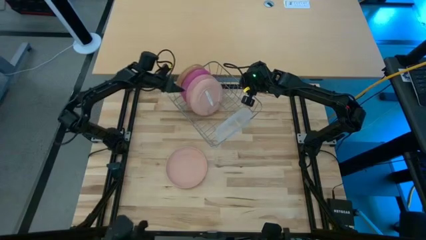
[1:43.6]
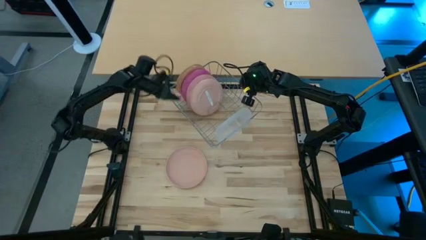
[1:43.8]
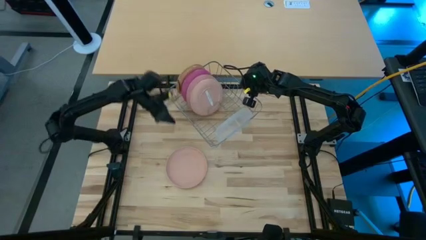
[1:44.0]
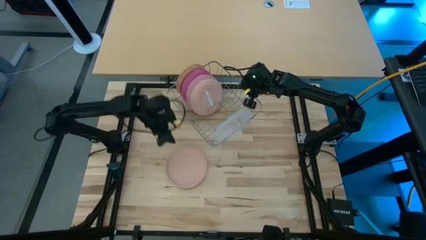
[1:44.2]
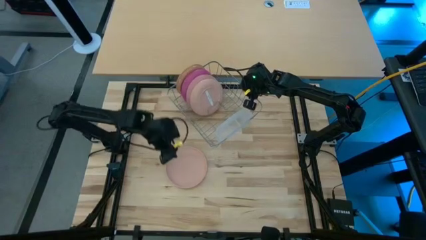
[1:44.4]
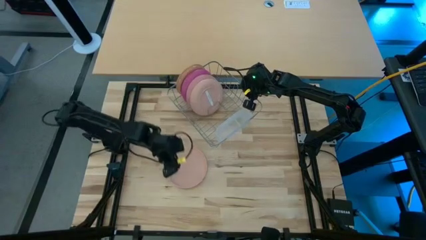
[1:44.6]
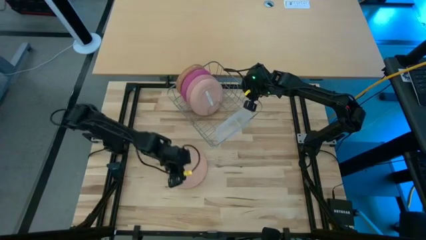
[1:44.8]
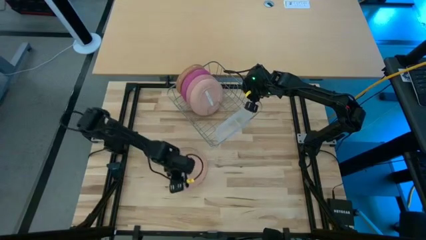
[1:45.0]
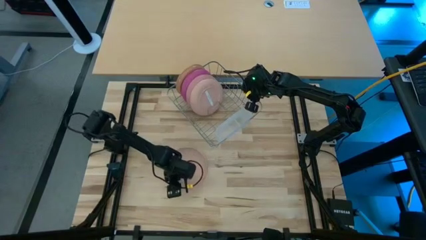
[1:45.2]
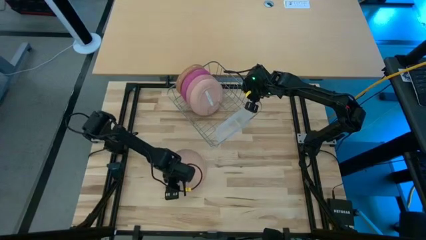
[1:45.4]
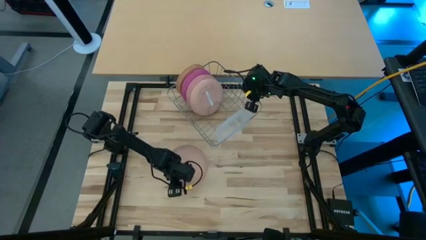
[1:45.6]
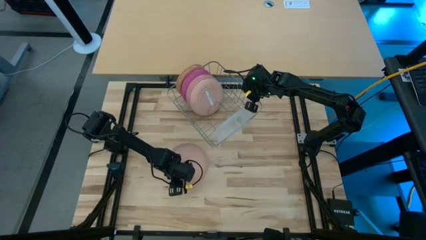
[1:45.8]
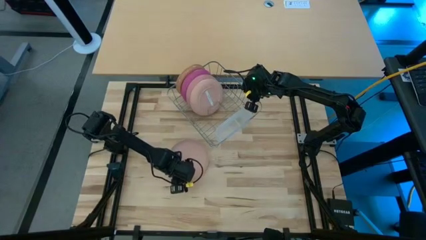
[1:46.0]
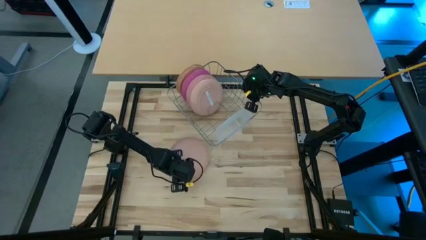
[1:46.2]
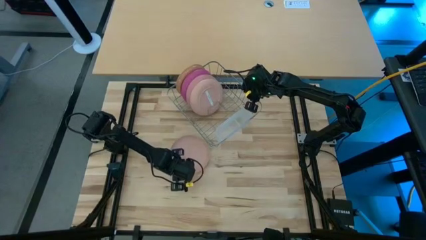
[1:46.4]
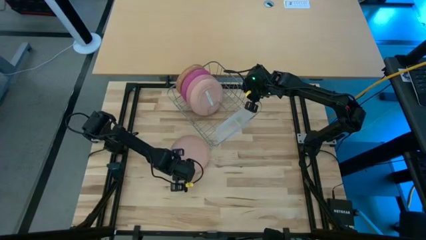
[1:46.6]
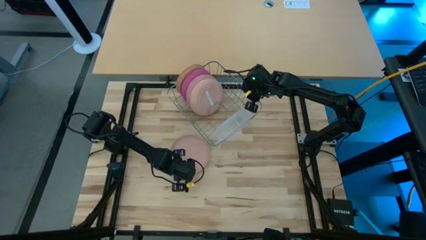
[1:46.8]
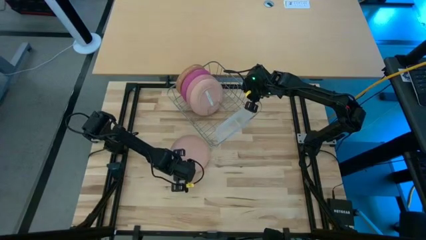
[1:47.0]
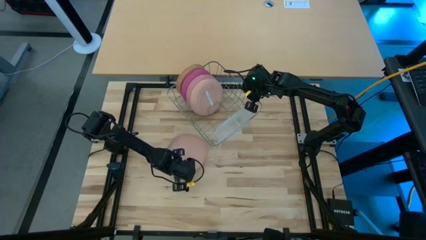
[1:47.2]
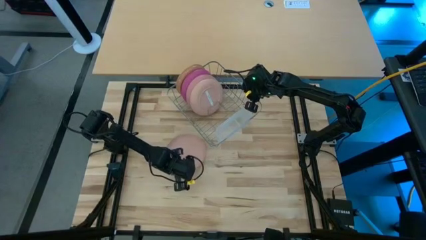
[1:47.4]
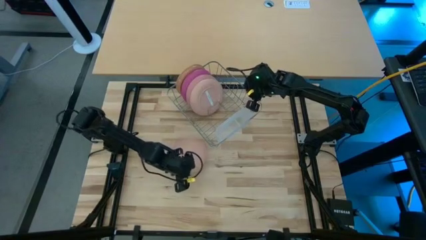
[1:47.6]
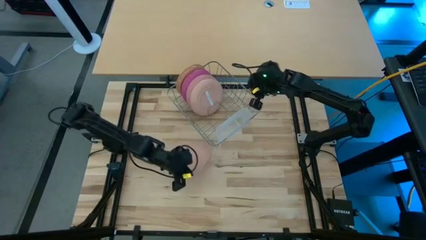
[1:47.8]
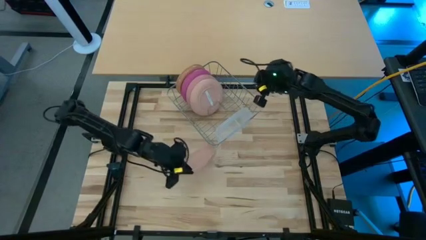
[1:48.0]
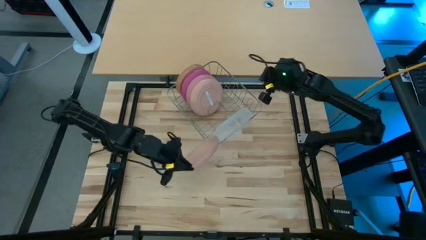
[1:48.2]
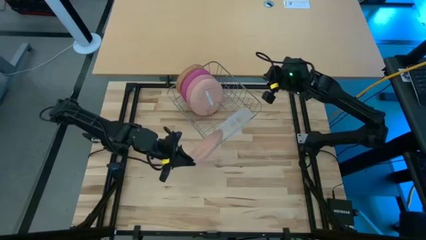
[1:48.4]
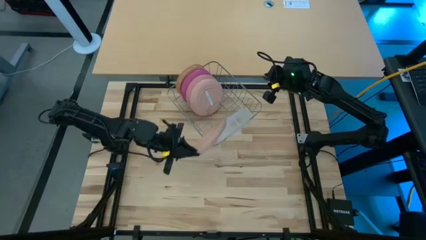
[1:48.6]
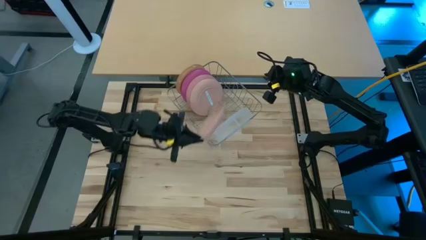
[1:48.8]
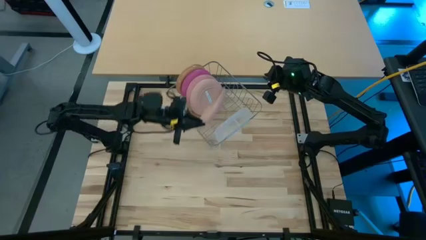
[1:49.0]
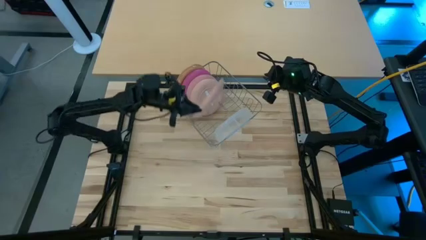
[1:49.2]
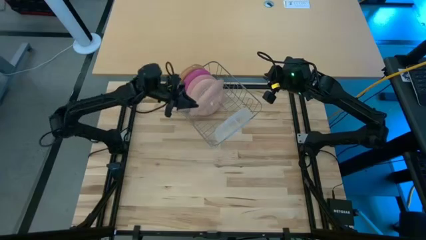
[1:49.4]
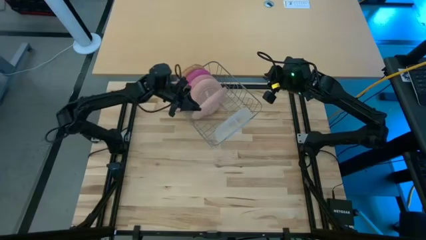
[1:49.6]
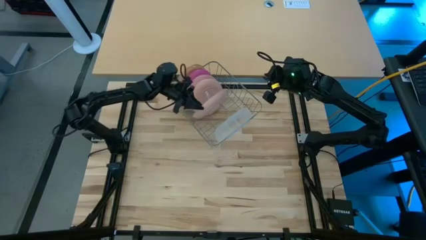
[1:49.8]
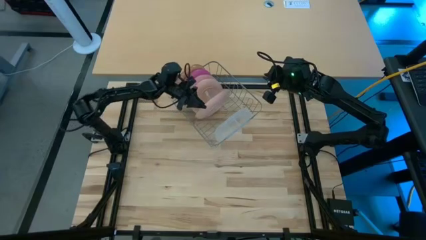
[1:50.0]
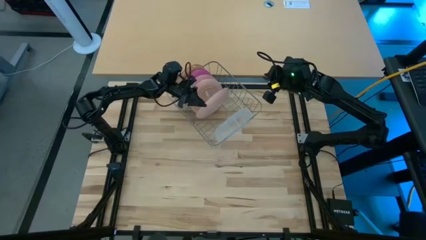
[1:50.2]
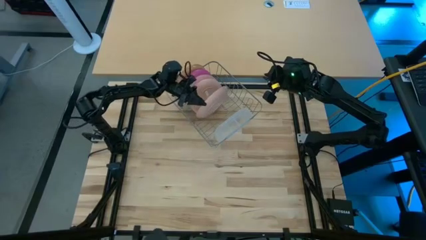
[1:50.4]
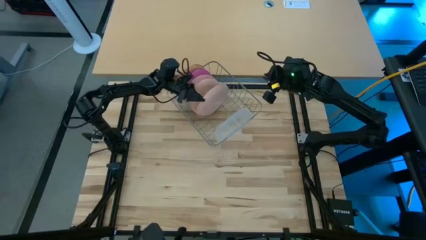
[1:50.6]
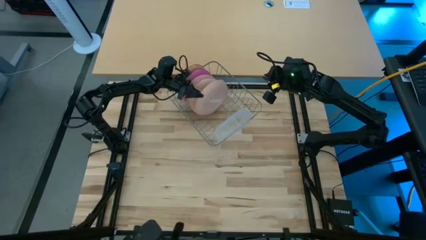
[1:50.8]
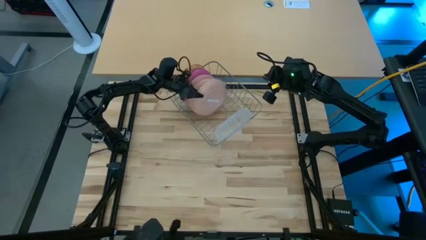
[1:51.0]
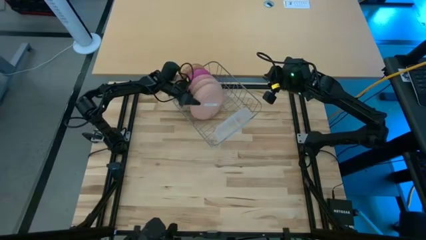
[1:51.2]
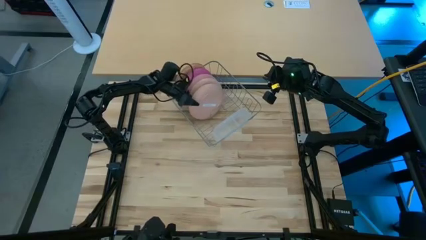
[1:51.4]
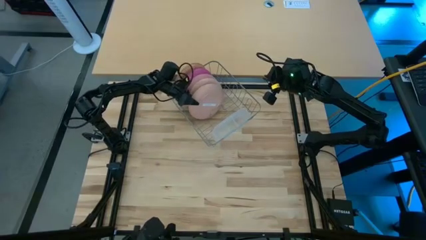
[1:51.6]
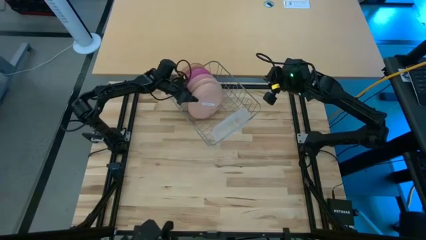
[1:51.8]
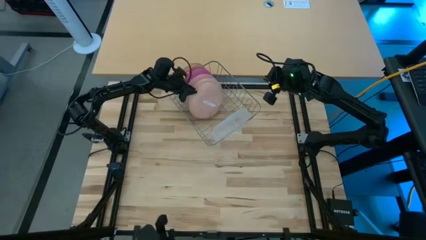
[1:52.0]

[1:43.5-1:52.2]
Task: Sort dishes
Put the pink plate into the dish rack

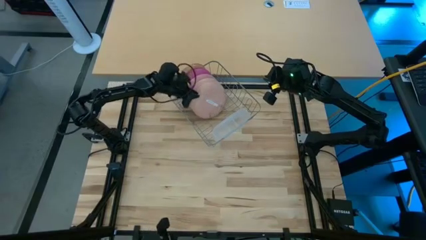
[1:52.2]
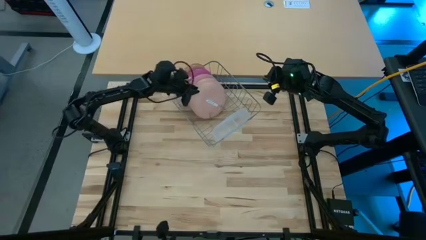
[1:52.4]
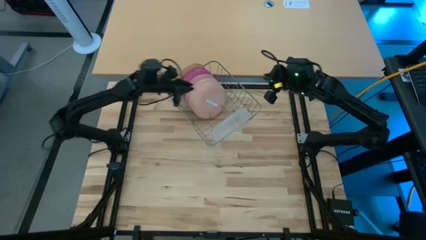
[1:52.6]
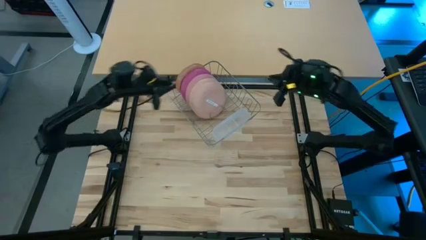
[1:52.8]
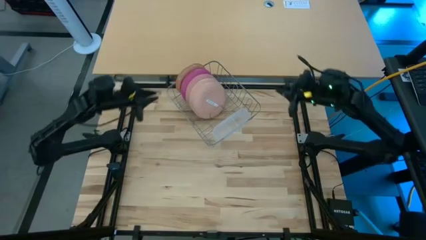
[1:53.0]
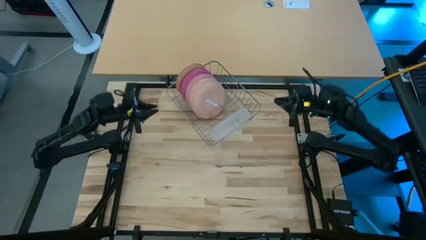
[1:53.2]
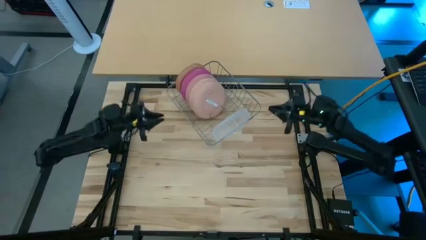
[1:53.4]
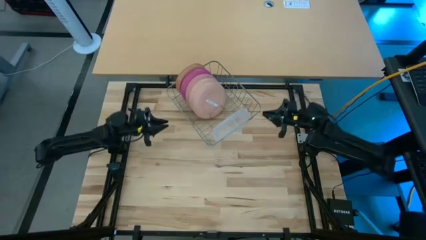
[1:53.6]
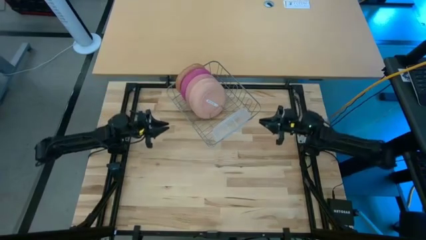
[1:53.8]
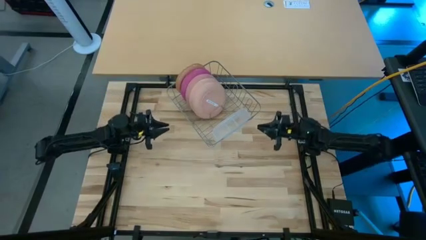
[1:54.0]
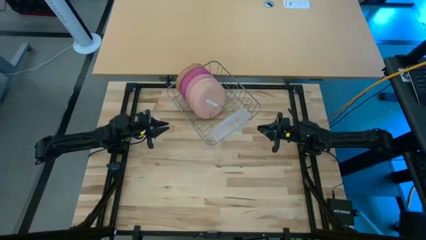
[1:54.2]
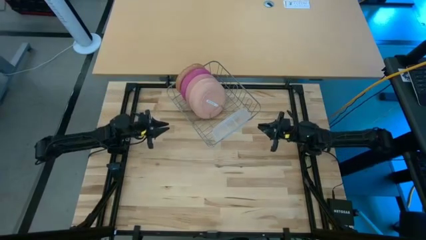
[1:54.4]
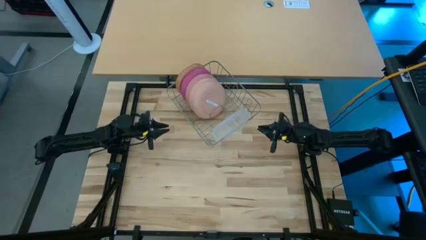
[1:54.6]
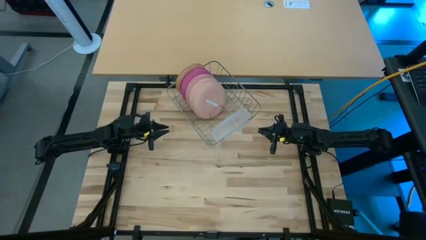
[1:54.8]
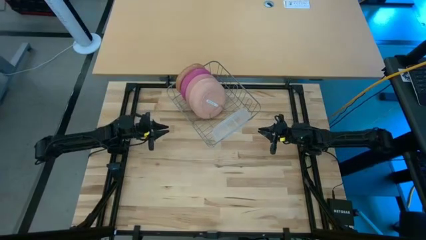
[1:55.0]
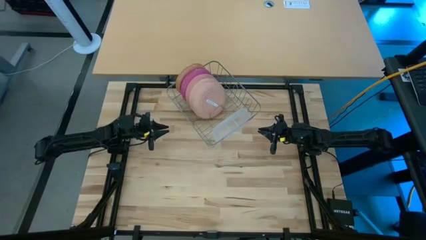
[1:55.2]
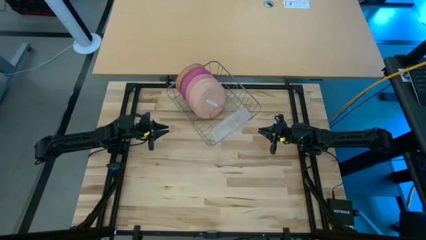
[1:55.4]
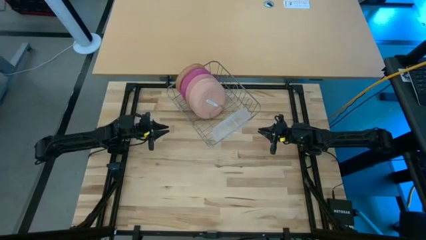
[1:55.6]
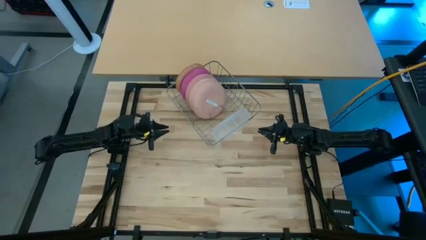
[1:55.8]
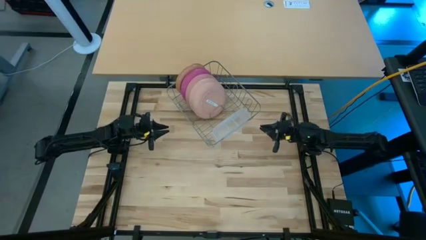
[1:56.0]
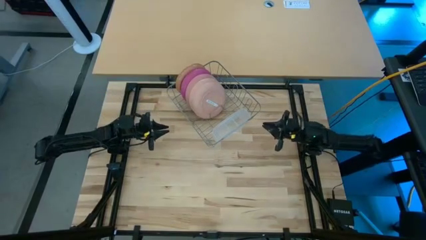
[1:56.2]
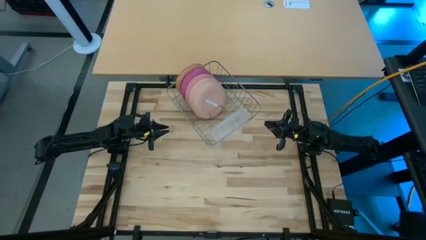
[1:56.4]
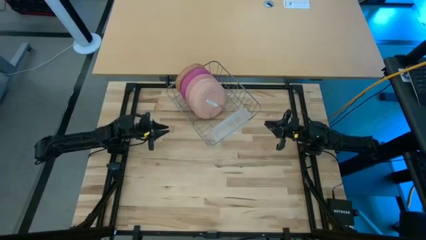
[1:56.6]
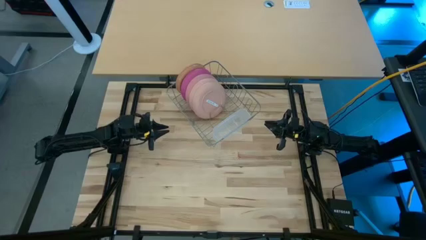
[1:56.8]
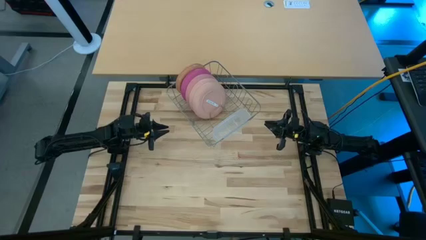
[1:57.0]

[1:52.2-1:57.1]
Return to Home Position
